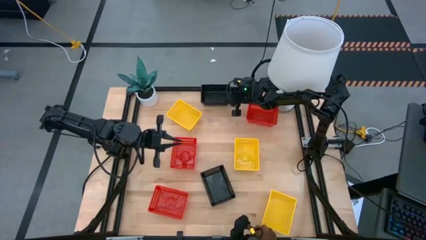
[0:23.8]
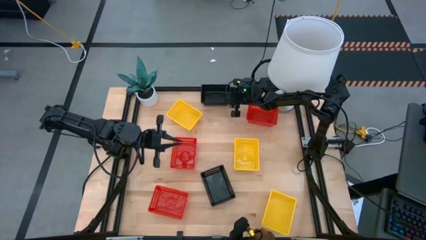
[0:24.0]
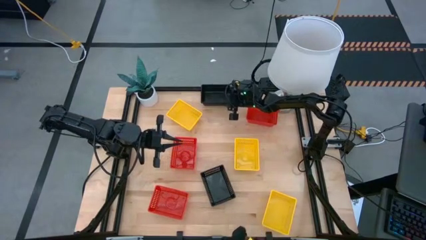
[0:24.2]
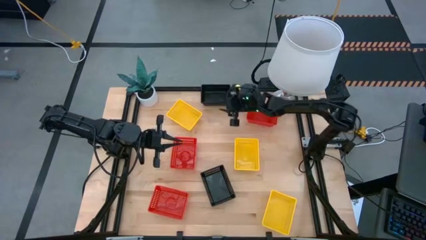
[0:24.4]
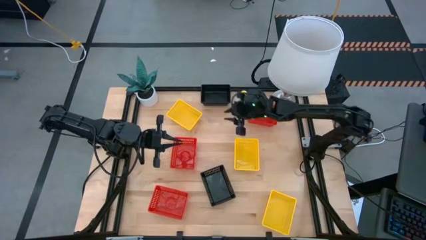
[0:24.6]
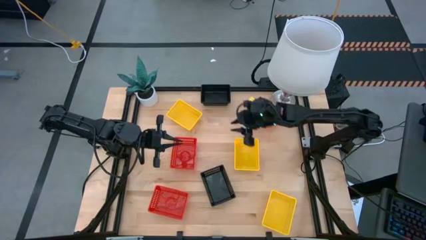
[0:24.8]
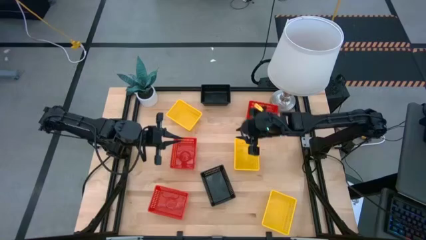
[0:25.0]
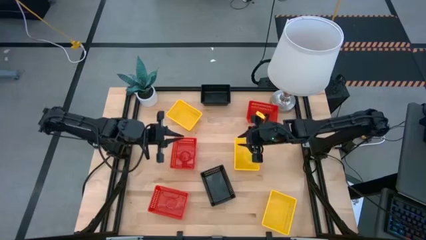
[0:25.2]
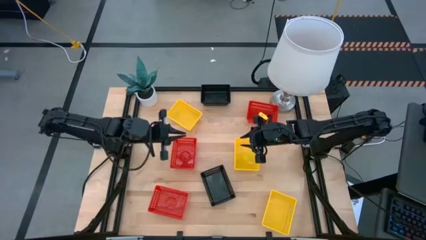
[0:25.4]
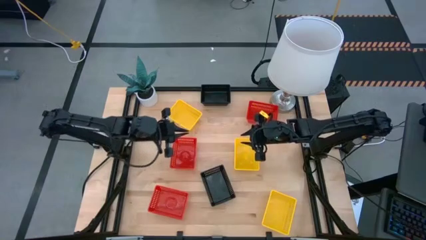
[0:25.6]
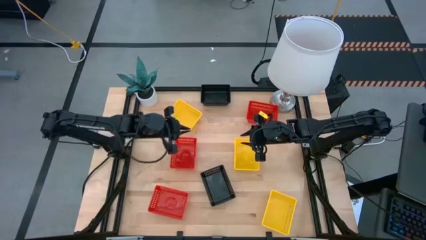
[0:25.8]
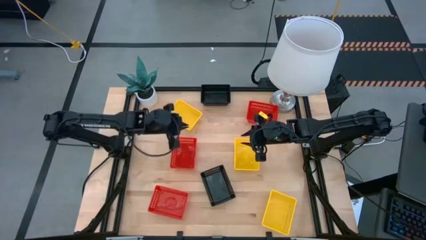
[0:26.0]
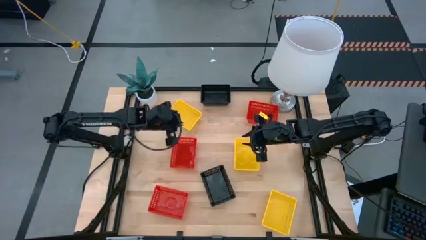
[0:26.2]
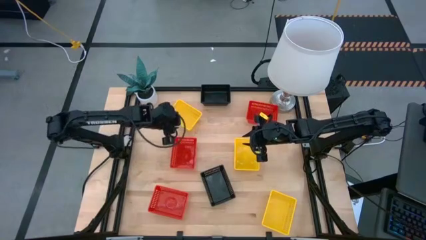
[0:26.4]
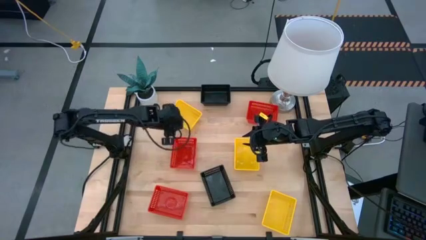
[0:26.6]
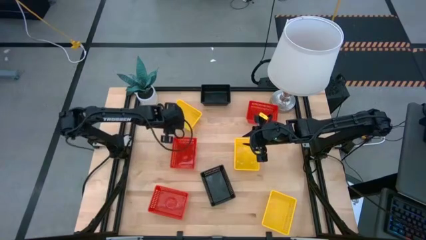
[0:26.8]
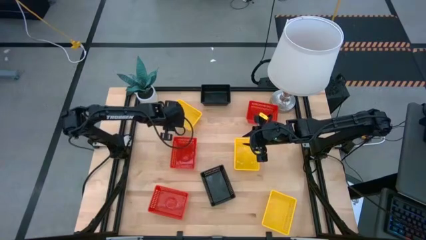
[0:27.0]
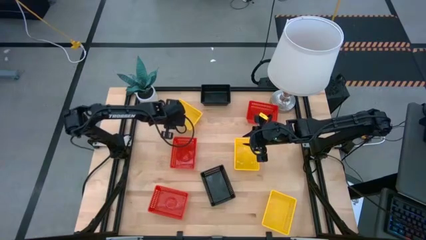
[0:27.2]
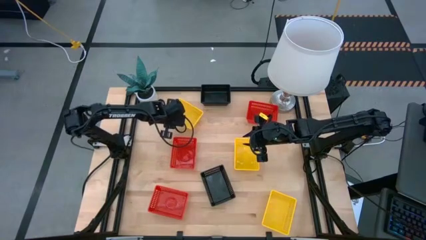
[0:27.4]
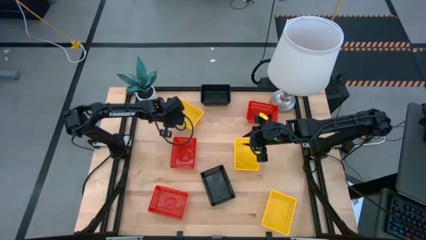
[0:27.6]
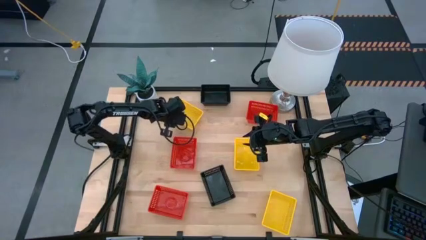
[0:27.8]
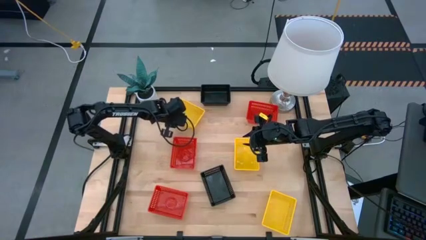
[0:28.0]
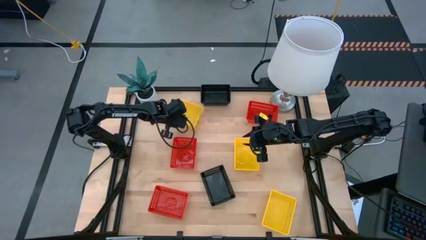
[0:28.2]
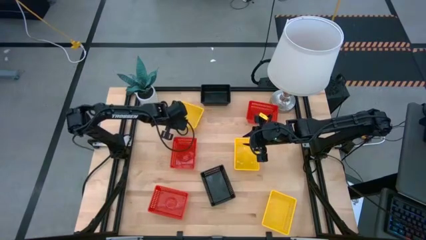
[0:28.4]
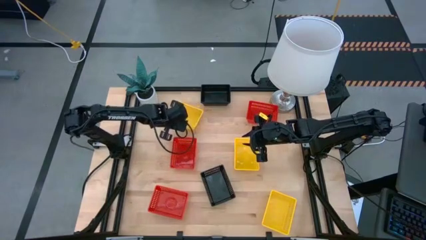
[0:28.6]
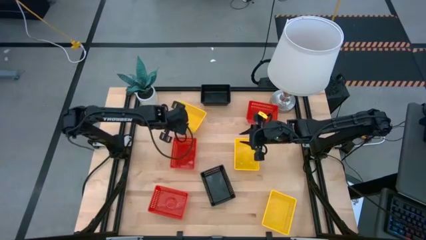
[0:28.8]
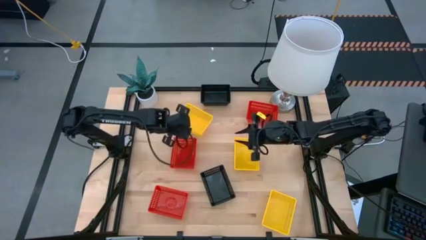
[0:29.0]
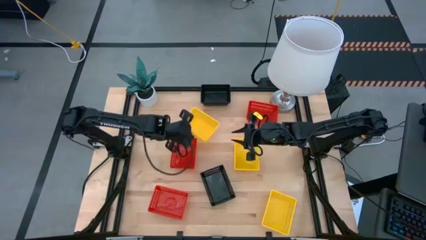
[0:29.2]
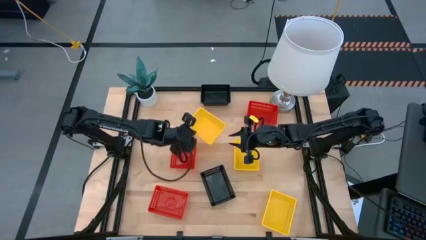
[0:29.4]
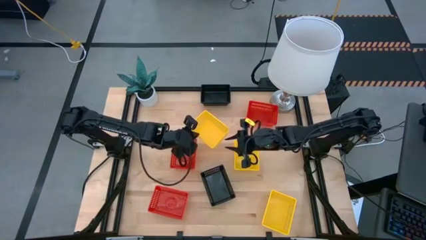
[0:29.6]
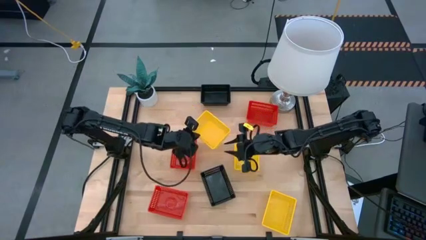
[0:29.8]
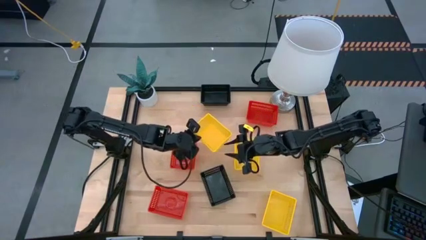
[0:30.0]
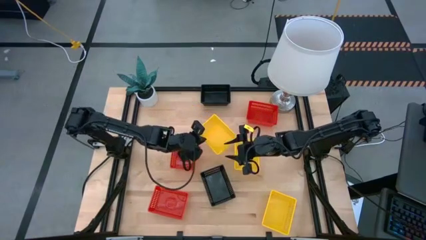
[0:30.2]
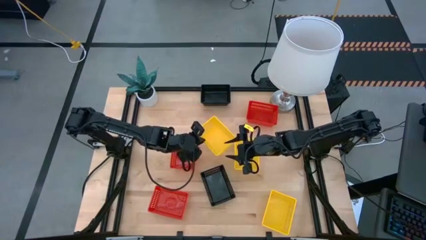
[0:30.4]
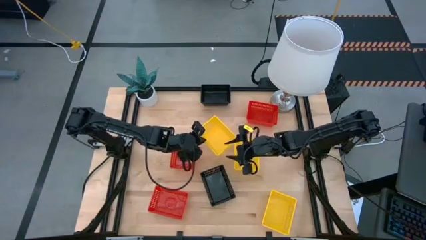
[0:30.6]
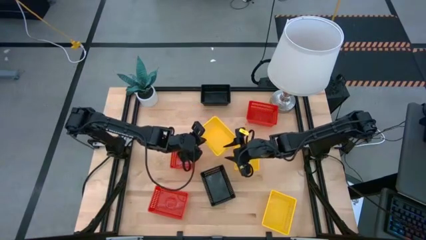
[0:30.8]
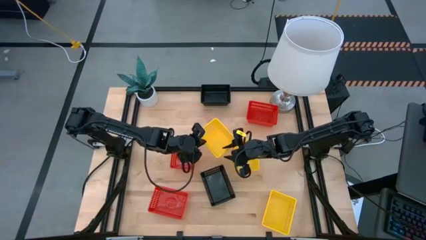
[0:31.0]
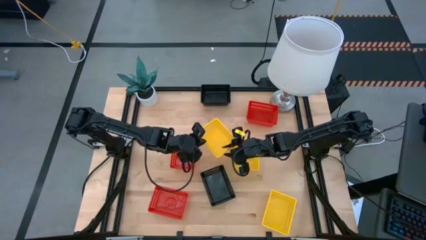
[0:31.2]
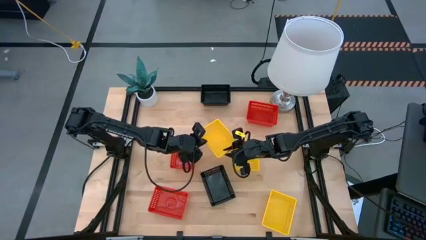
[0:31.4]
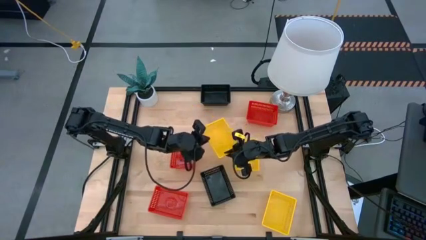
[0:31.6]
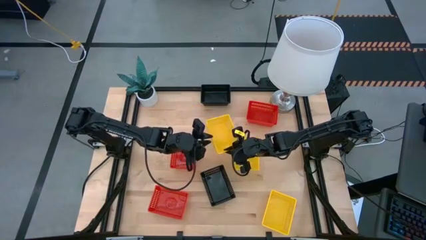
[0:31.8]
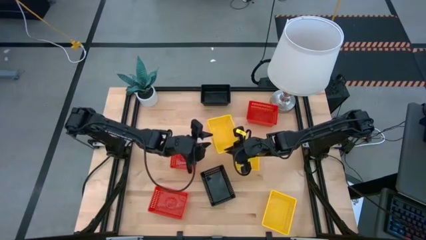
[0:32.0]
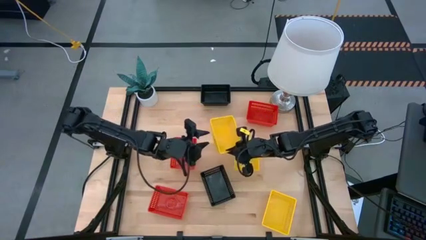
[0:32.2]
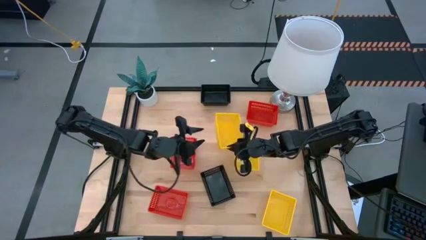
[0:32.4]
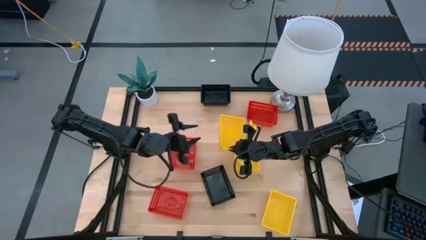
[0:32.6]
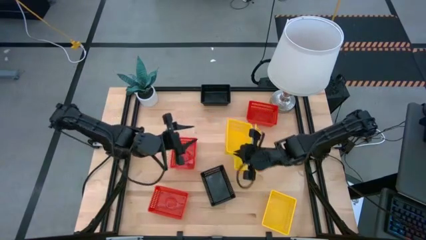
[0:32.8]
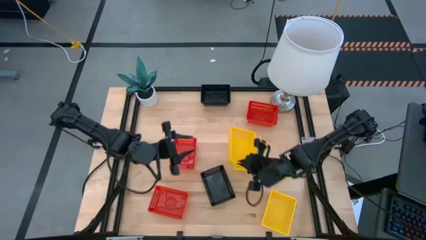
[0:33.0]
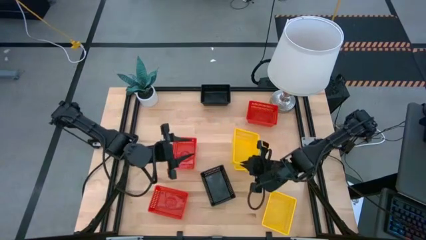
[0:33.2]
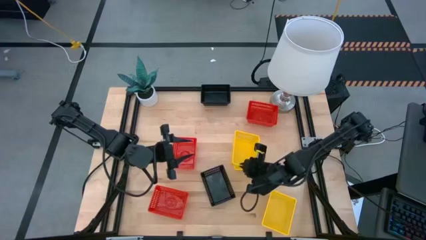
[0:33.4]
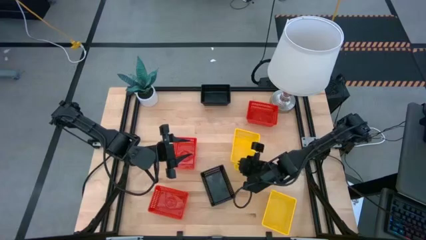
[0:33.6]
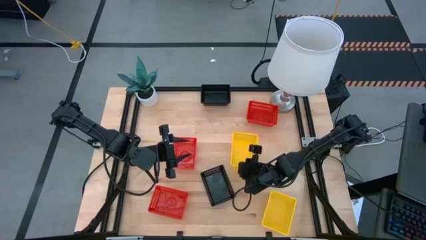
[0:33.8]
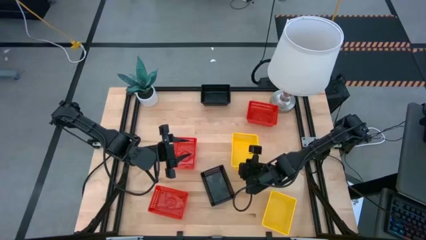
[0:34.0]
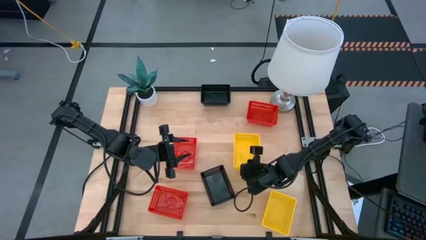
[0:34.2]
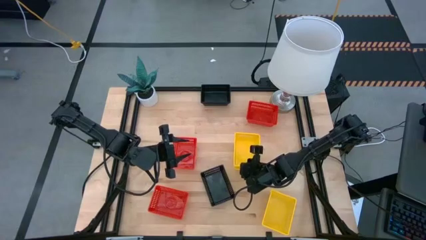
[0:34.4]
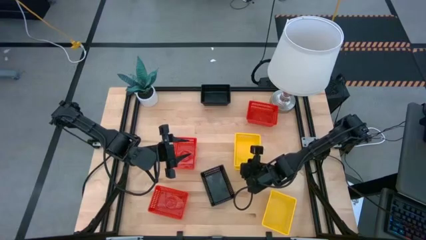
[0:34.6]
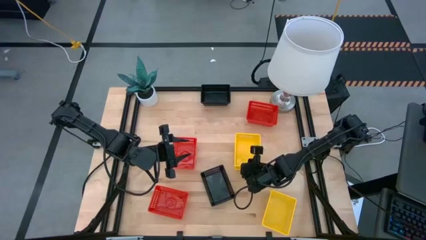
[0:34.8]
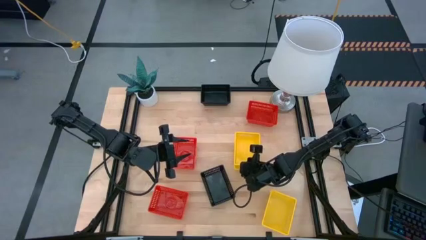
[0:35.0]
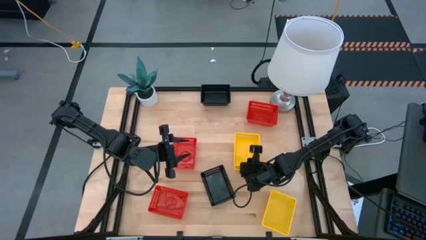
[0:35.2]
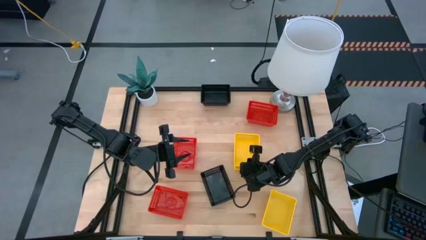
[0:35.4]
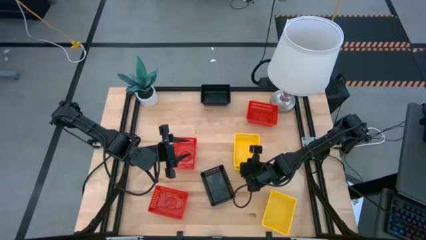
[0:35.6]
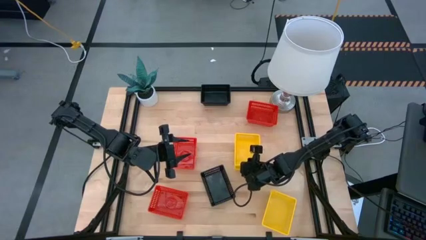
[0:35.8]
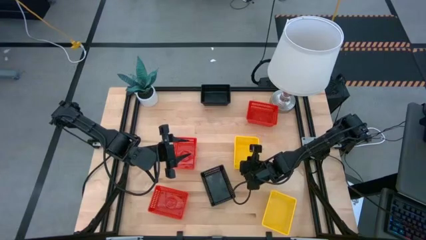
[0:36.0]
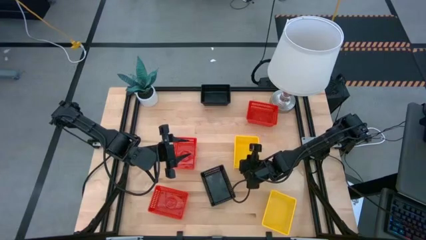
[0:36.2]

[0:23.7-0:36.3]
Stack the top yellow basket on the middle yellow basket
